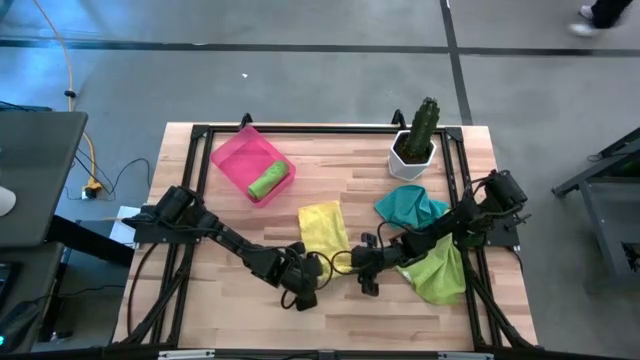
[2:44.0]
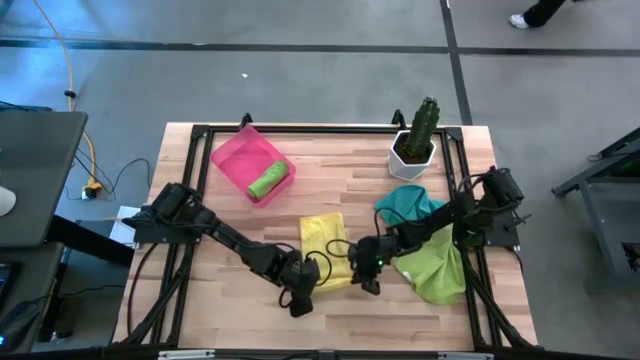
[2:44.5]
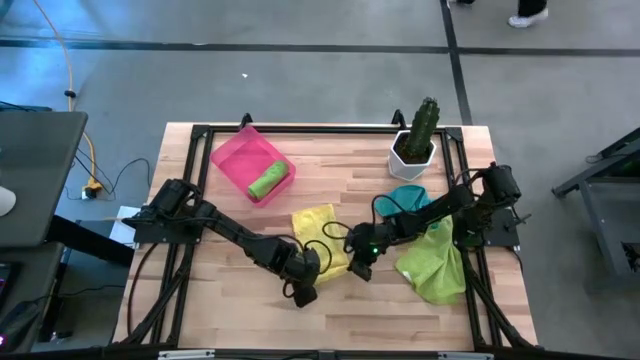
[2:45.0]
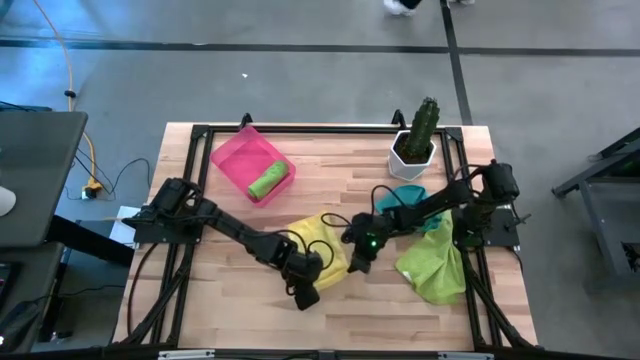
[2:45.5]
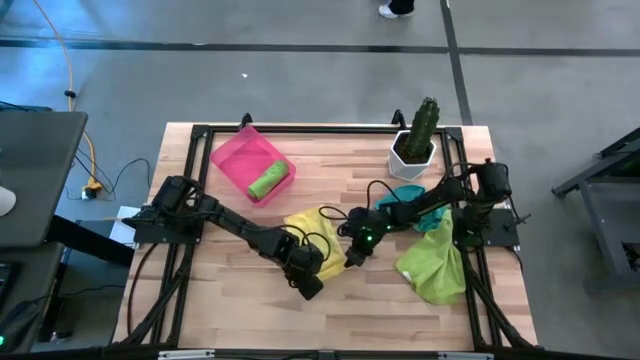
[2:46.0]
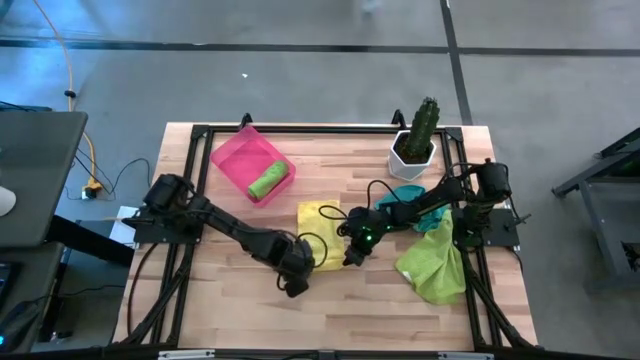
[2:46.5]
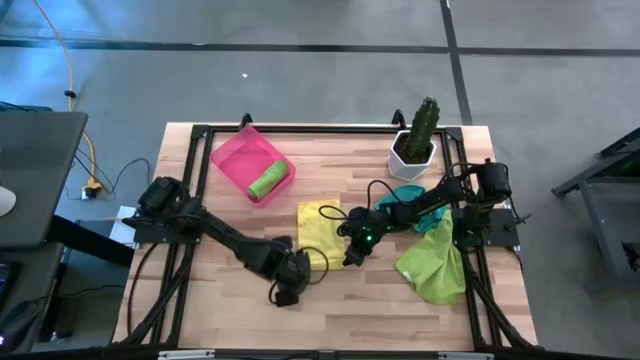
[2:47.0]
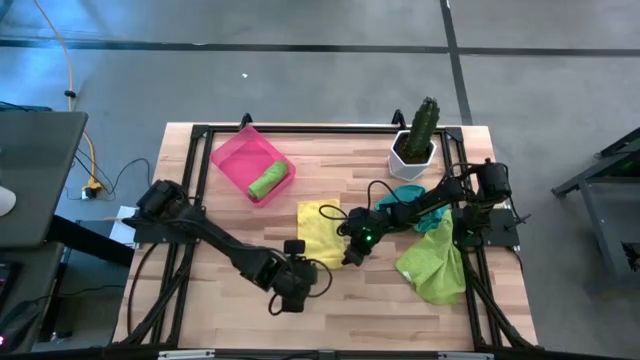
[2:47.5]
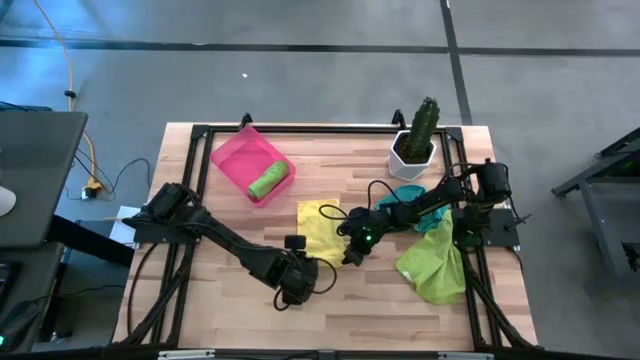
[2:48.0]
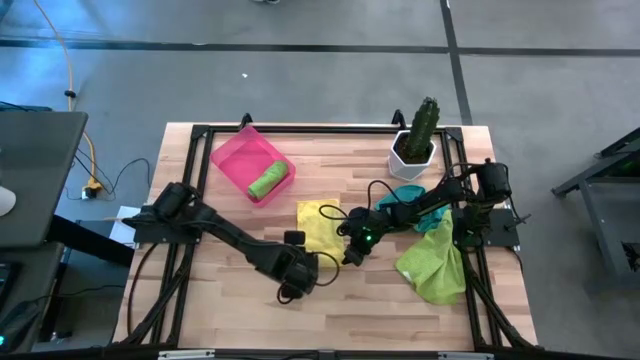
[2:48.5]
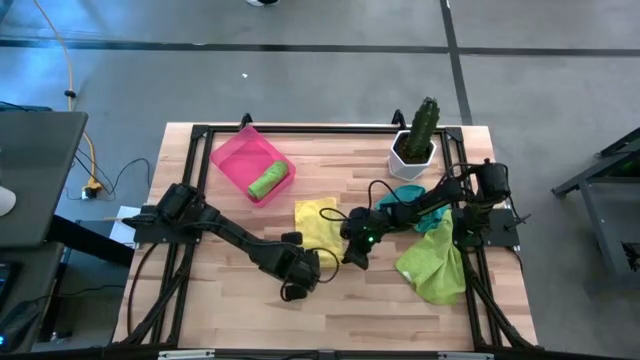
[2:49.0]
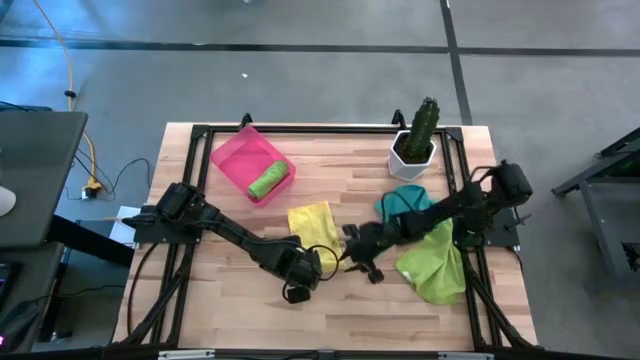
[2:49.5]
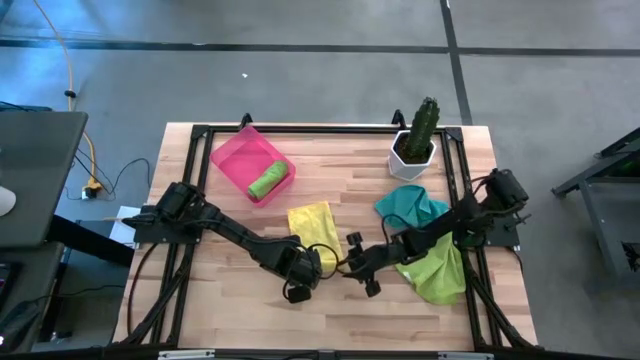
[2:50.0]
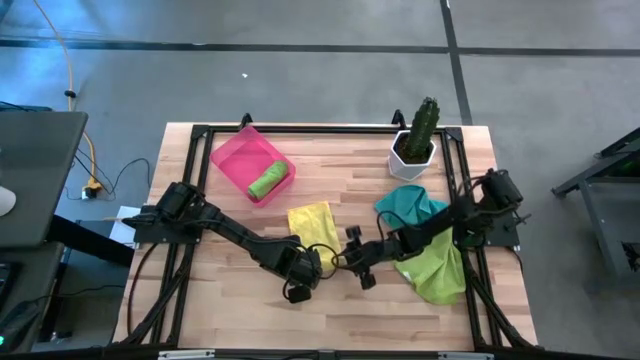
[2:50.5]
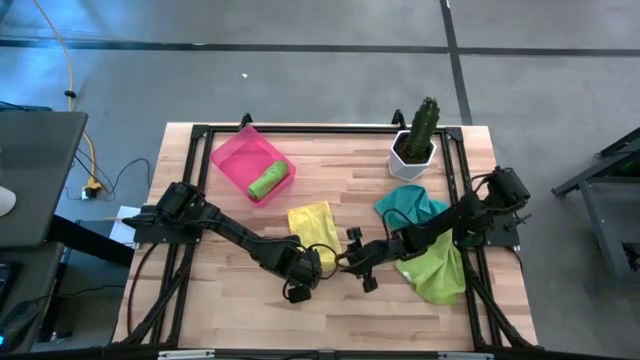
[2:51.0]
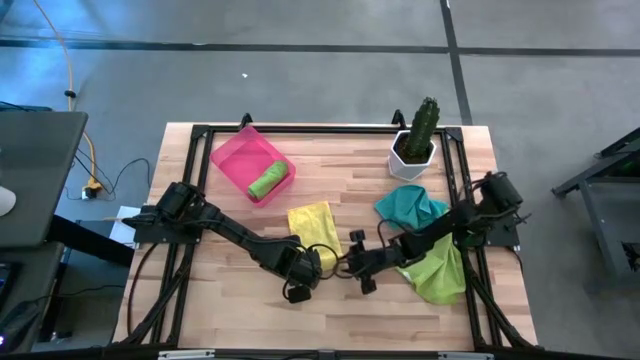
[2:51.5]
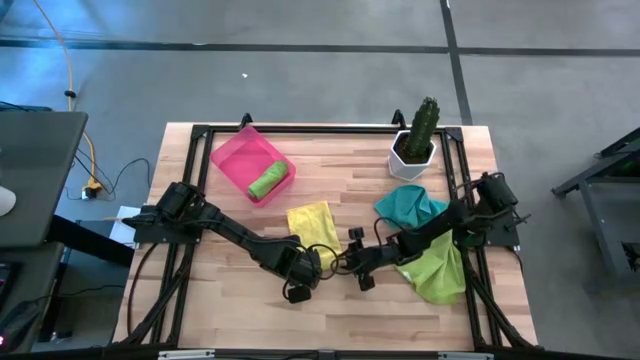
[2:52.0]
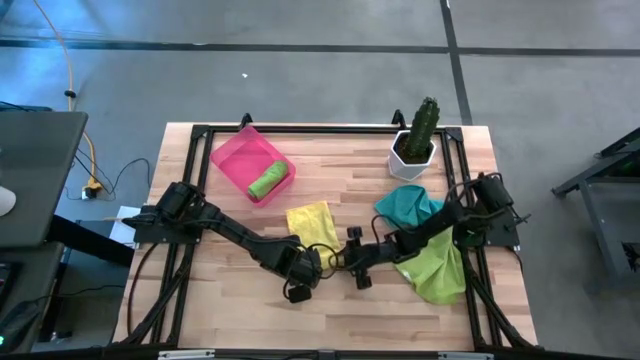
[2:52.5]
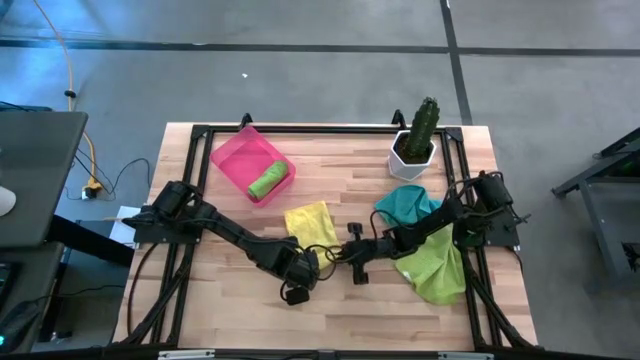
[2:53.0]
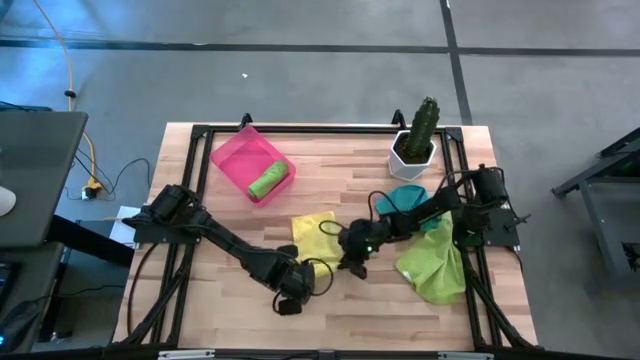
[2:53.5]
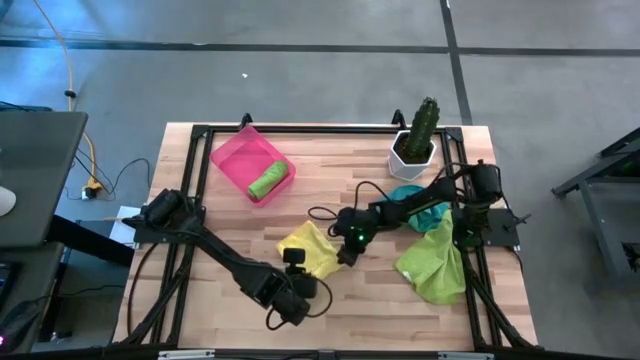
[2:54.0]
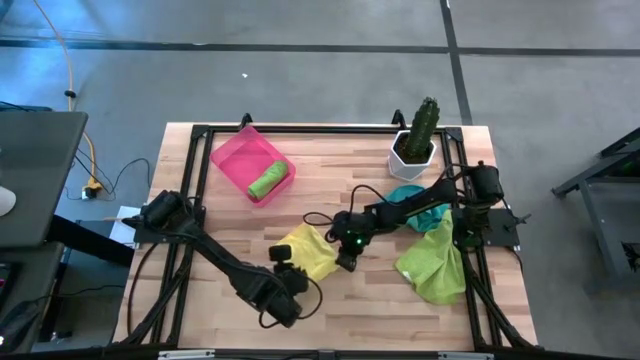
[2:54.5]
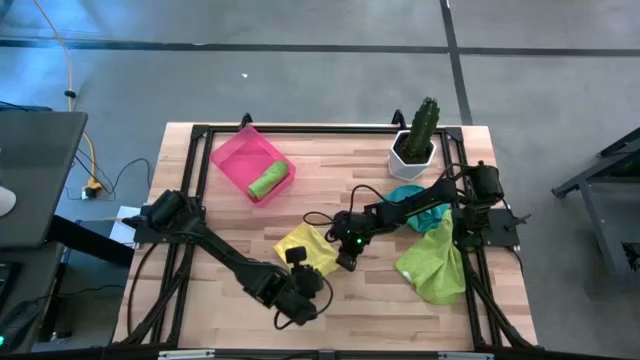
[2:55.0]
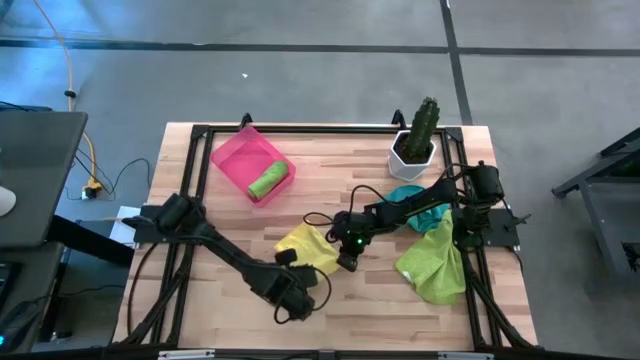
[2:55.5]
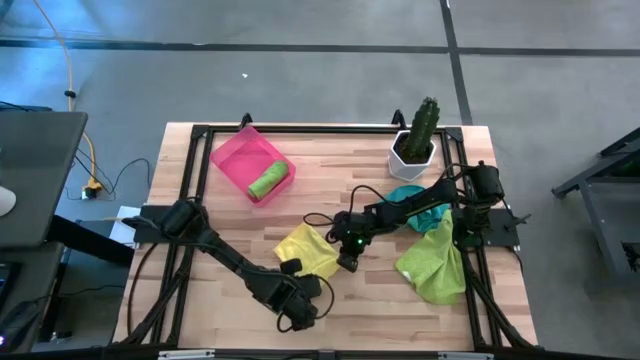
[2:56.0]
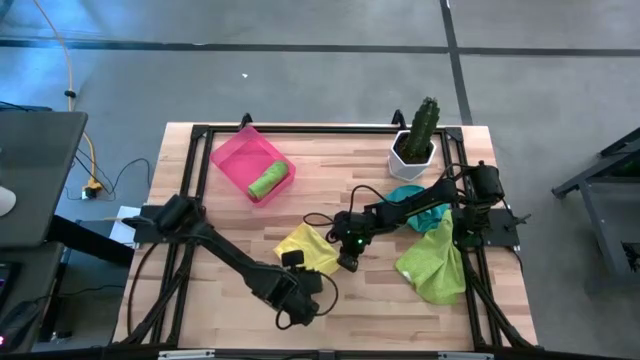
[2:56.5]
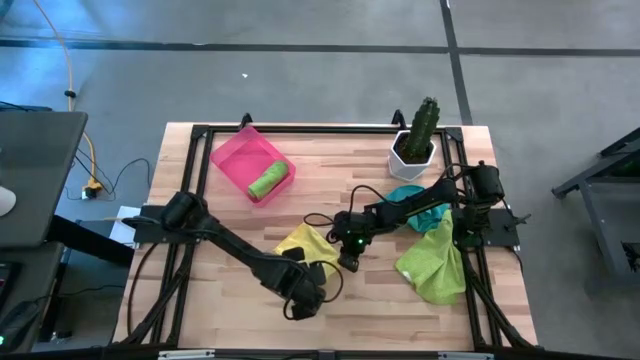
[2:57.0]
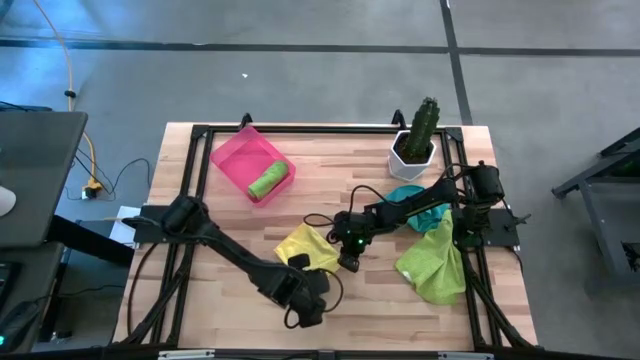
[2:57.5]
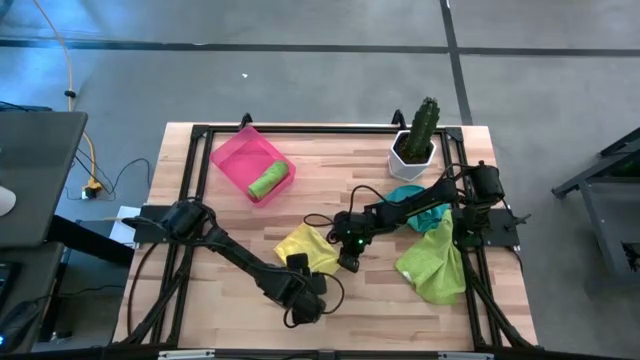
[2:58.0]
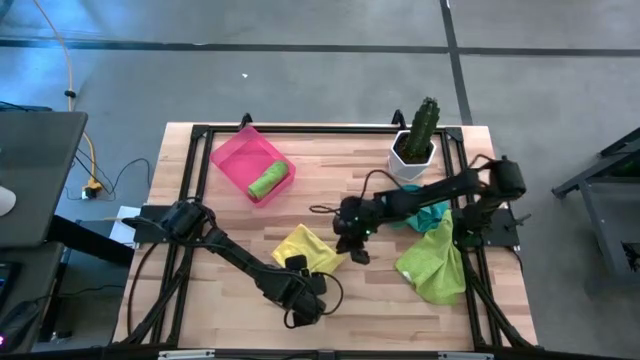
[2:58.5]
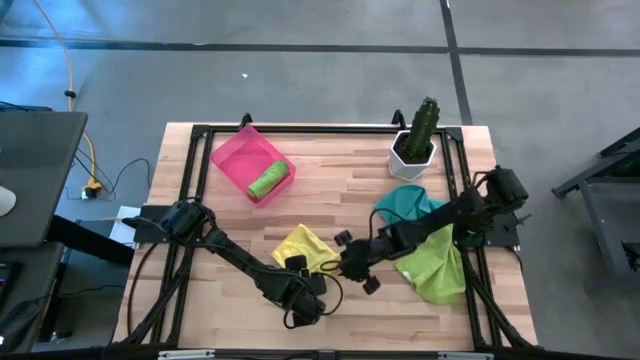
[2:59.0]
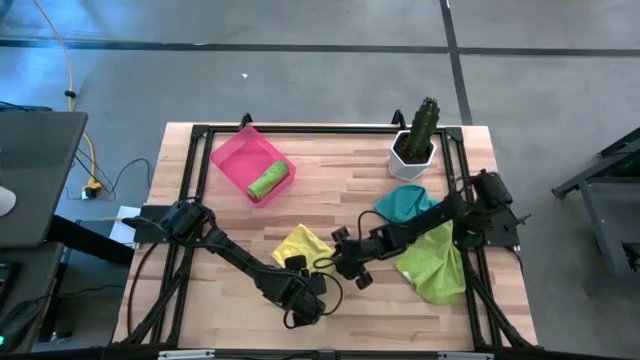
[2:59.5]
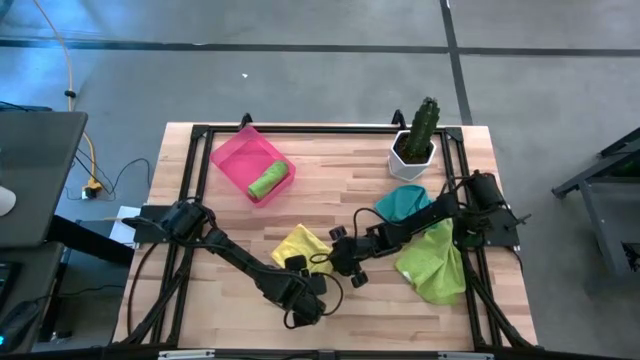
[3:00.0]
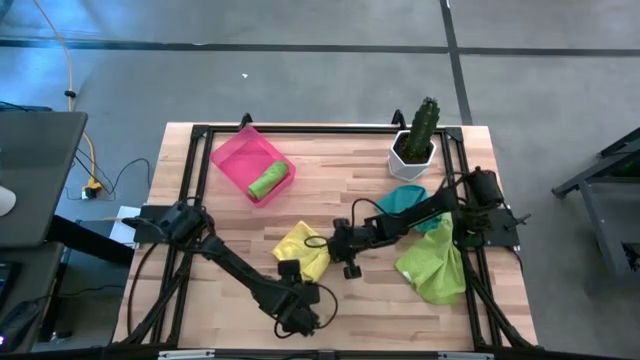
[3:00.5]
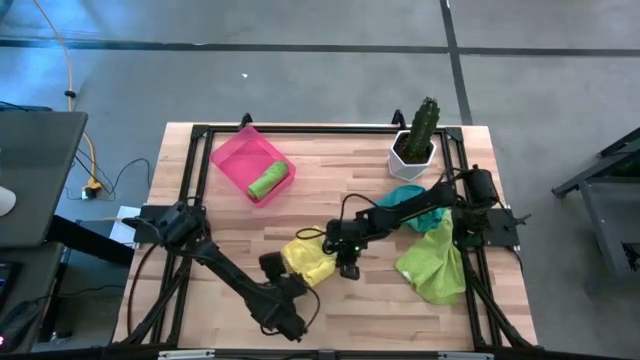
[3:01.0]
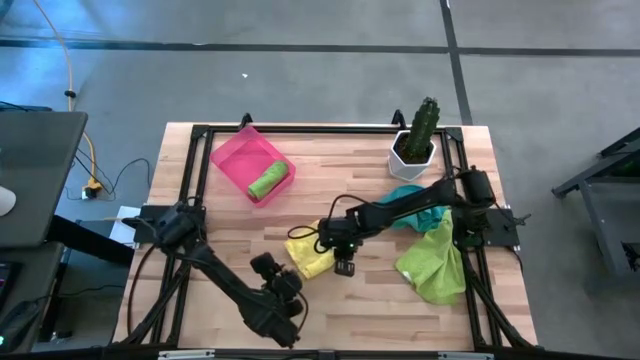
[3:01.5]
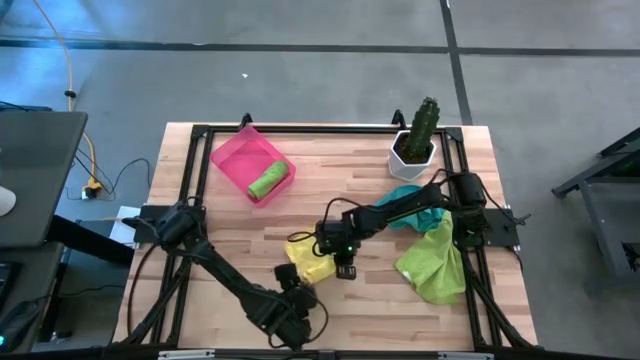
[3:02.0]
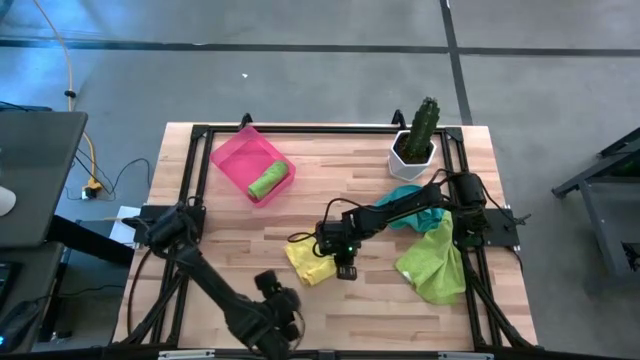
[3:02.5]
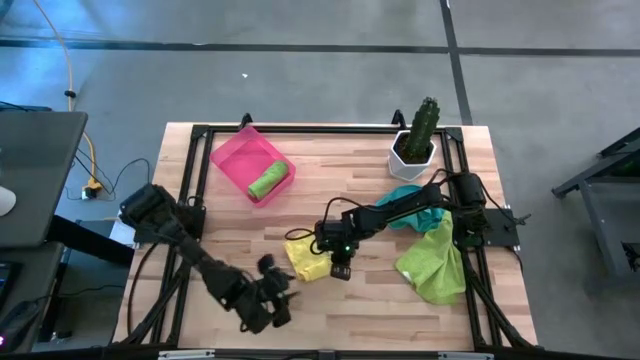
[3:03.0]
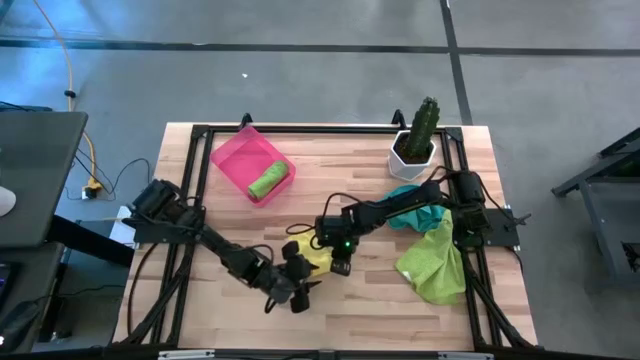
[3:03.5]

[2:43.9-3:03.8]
Task: Roll microfiber towels into tight, uniform cylinder then place into a basket
Roll the yellow microfiber cloth

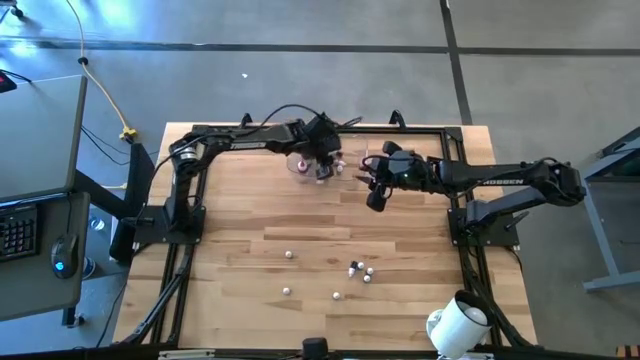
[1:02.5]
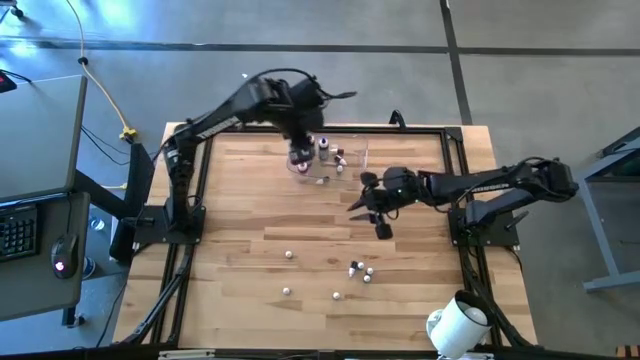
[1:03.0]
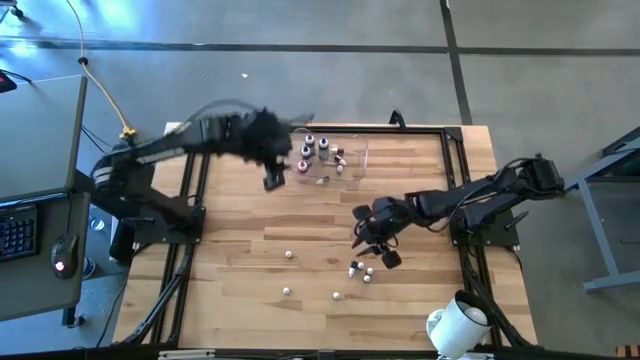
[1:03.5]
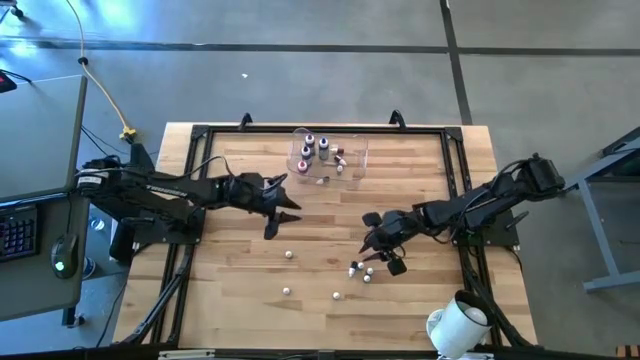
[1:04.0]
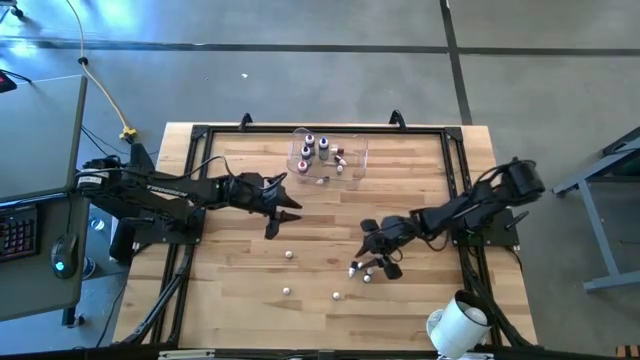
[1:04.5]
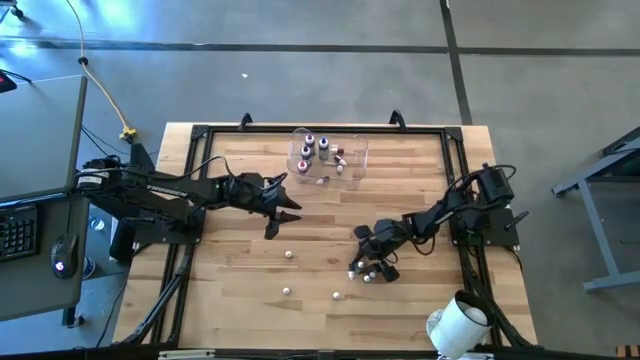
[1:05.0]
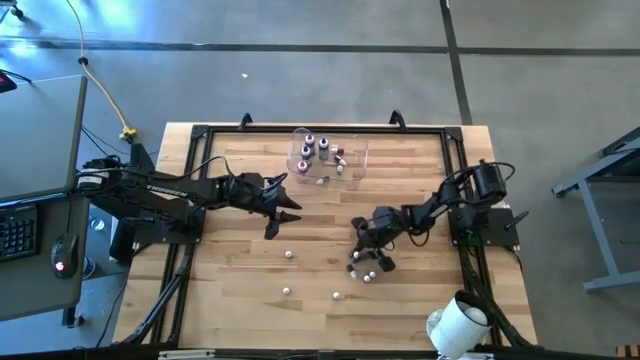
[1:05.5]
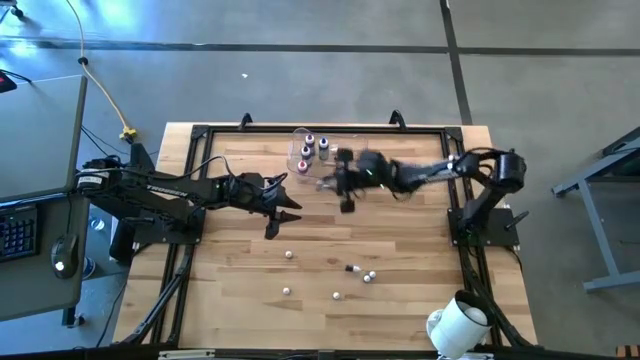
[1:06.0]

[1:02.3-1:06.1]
Task: Pick & Place food coloring
Put the purple food coloring into the transparent bin
